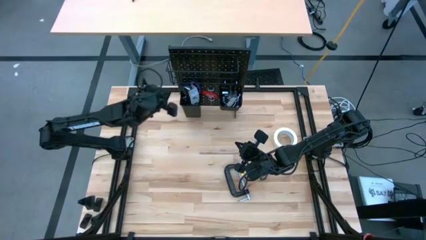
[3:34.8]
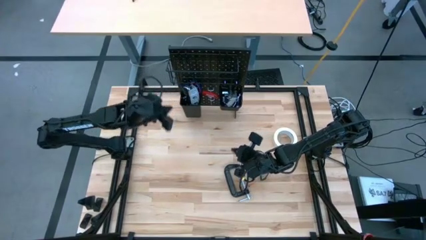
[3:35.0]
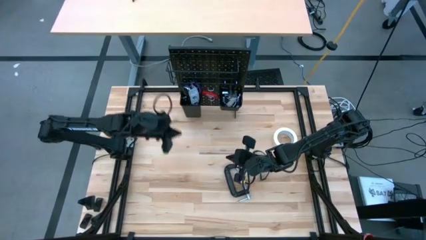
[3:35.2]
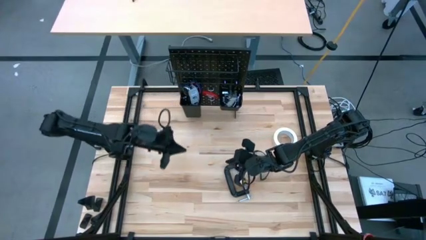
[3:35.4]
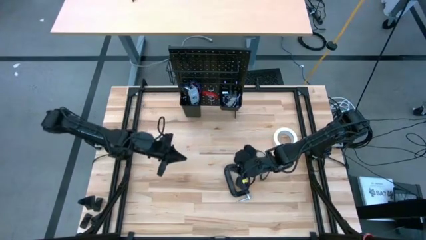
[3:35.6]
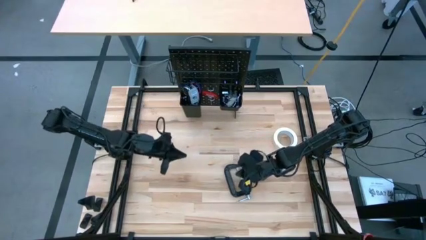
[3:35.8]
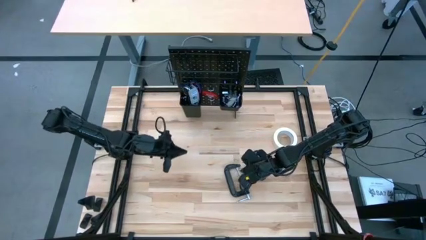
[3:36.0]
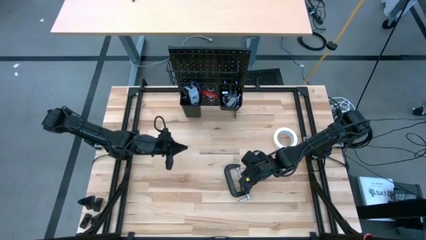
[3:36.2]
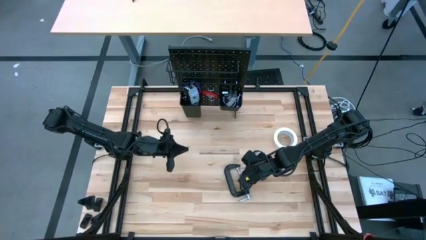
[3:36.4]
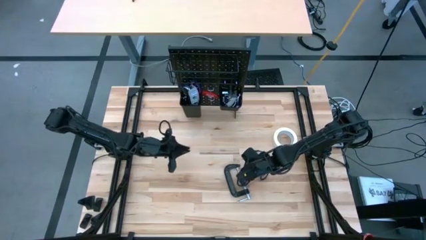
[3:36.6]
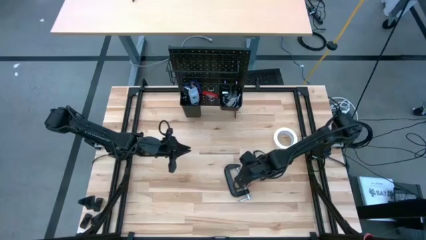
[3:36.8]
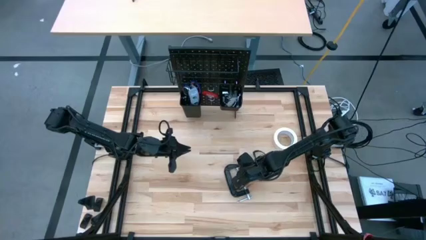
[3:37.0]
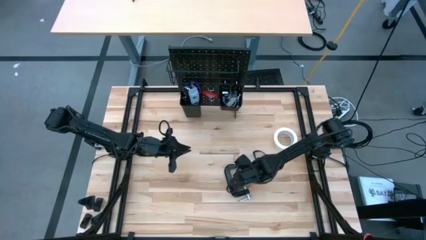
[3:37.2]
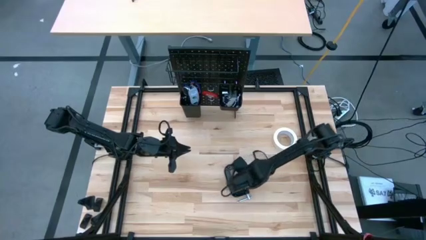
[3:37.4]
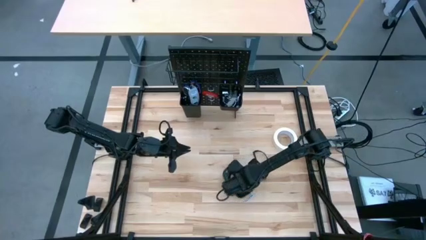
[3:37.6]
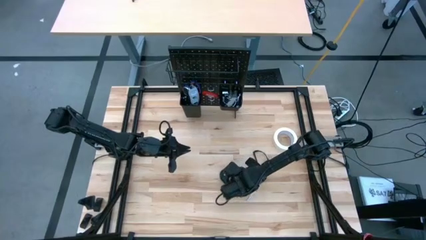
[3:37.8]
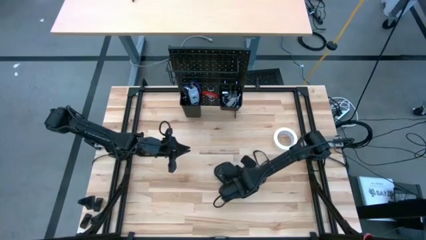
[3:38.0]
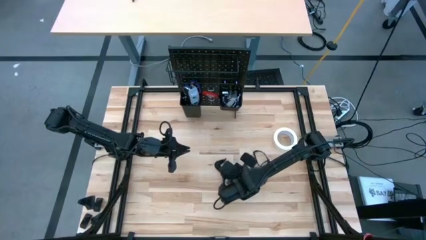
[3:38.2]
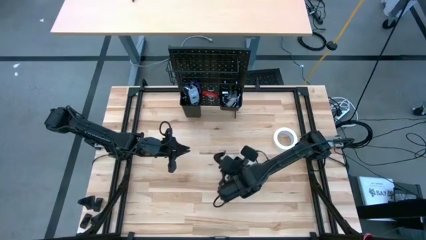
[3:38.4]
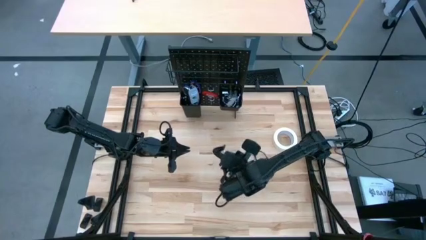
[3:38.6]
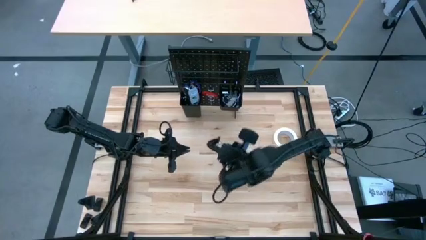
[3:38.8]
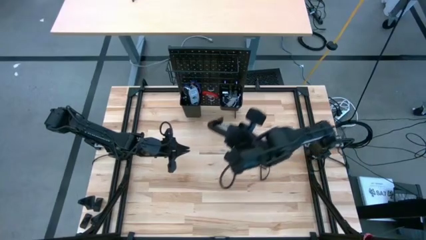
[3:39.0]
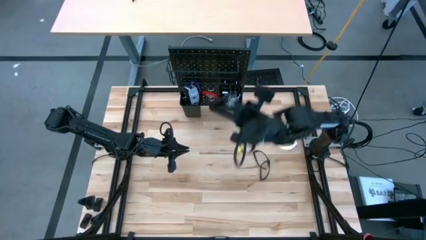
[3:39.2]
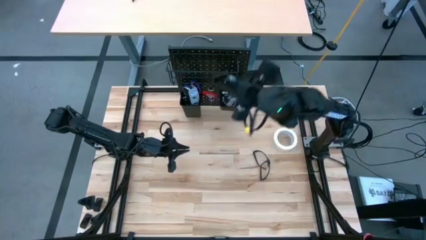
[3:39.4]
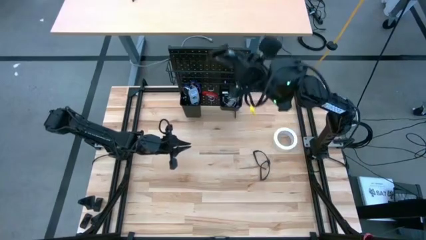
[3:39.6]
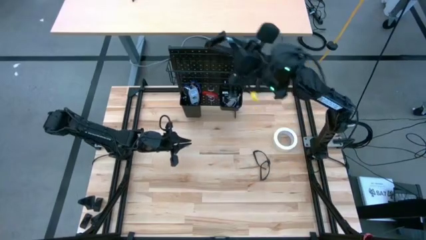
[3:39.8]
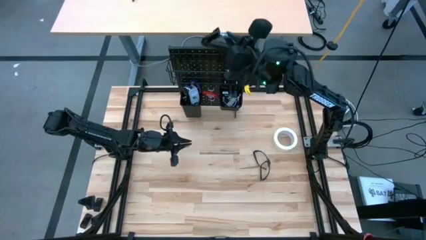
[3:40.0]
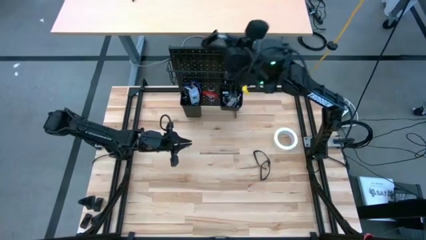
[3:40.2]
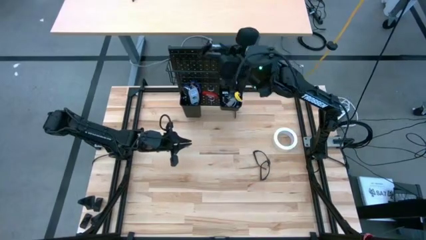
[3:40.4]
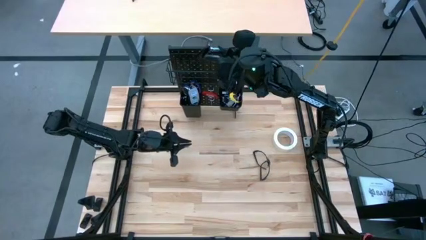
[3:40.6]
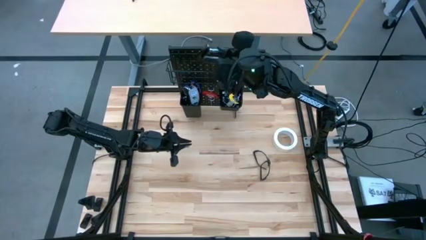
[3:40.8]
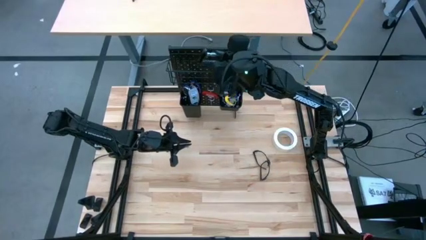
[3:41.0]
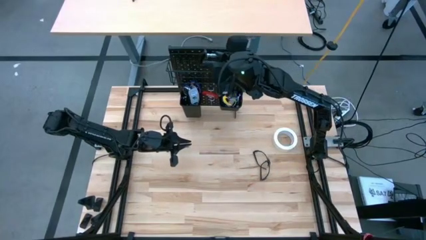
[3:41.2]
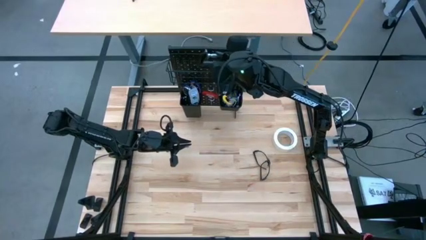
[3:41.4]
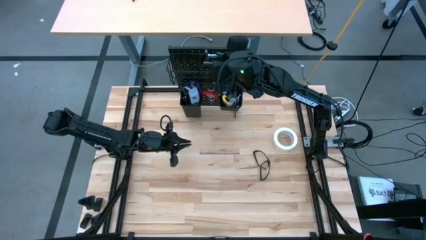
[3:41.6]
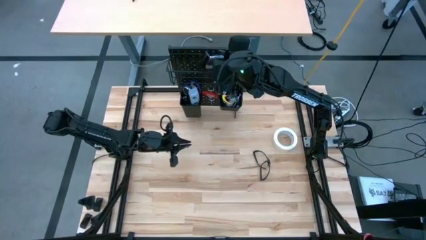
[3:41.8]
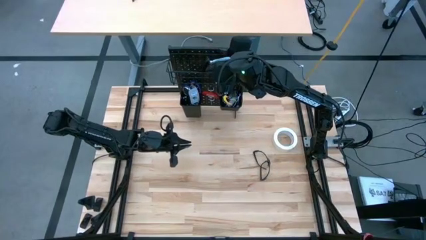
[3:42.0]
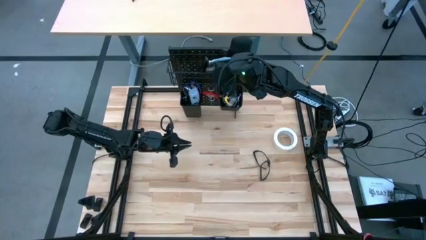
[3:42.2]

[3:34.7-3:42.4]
Task: Hang tools onto peg board
Put the black clamp into the wire basket on the peg board
